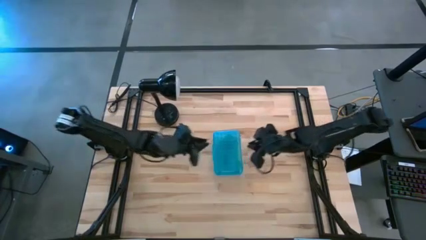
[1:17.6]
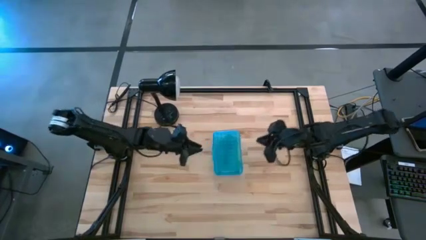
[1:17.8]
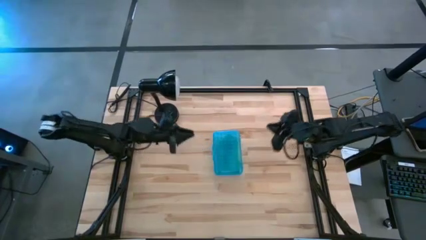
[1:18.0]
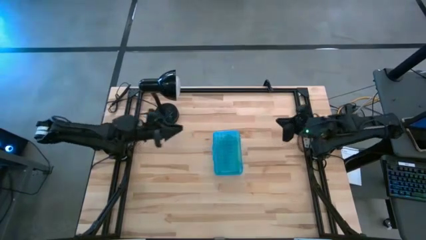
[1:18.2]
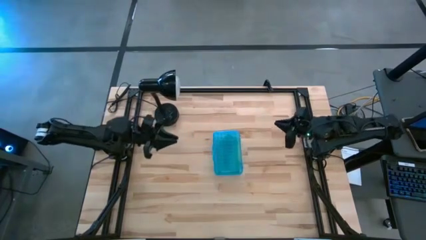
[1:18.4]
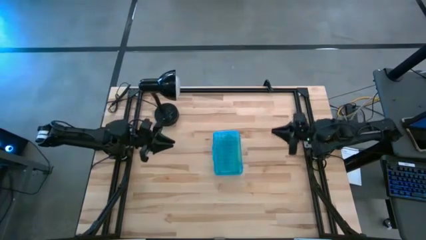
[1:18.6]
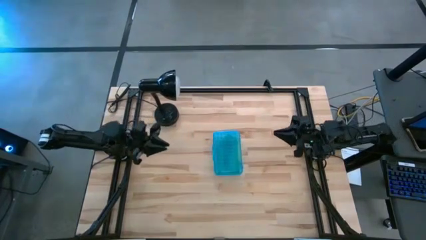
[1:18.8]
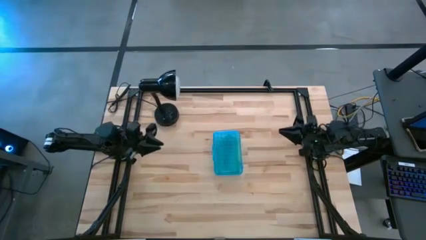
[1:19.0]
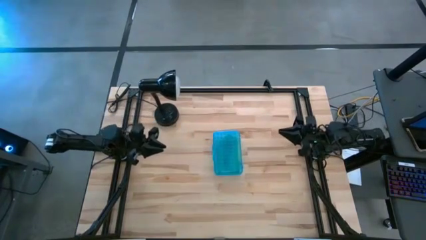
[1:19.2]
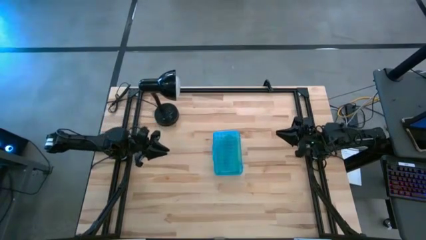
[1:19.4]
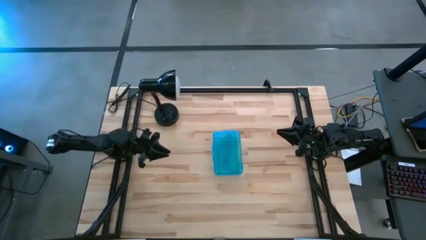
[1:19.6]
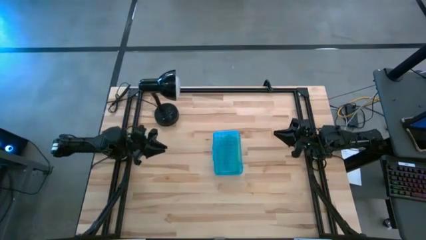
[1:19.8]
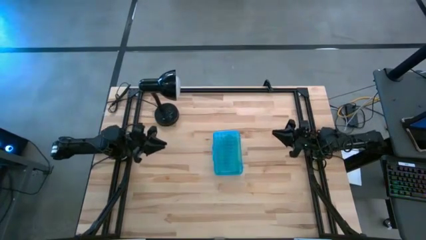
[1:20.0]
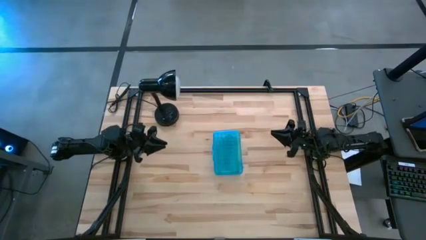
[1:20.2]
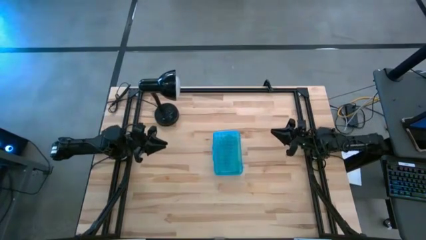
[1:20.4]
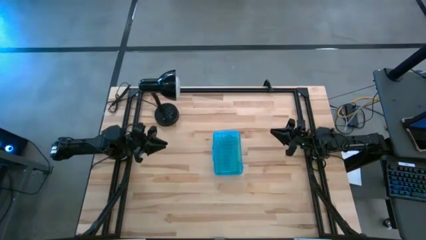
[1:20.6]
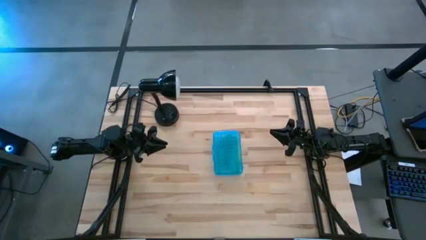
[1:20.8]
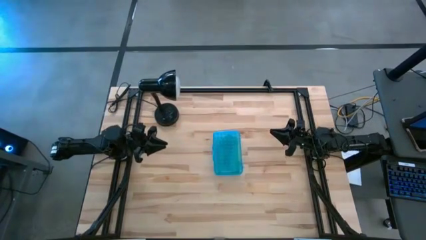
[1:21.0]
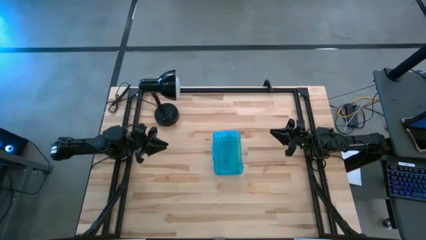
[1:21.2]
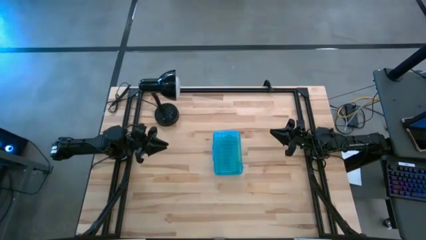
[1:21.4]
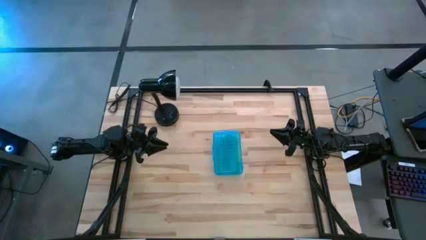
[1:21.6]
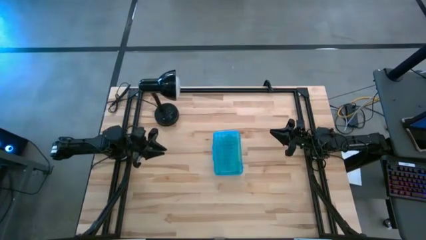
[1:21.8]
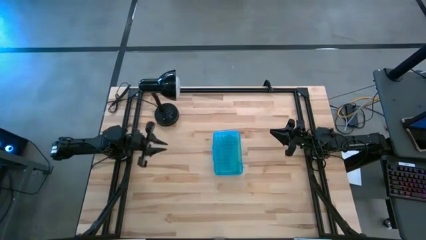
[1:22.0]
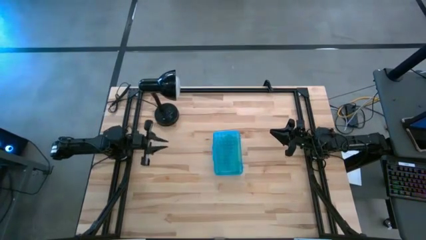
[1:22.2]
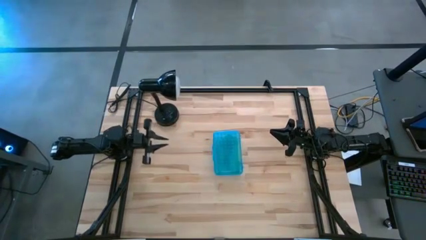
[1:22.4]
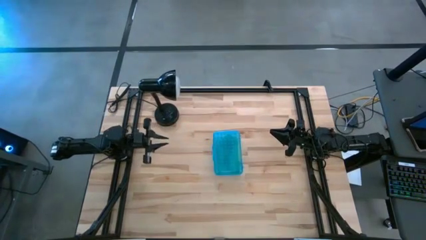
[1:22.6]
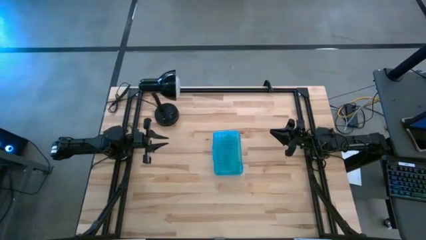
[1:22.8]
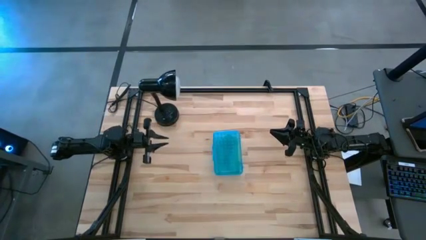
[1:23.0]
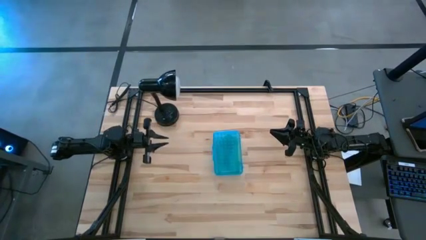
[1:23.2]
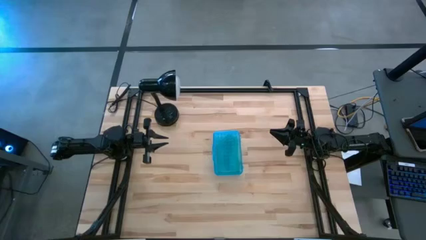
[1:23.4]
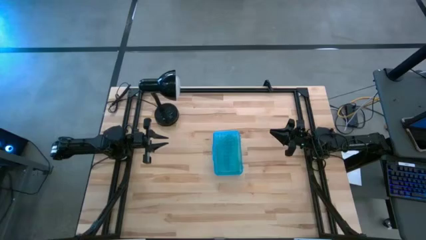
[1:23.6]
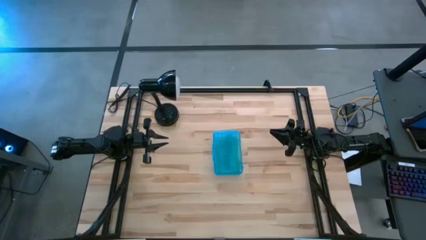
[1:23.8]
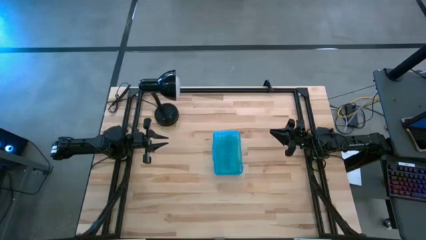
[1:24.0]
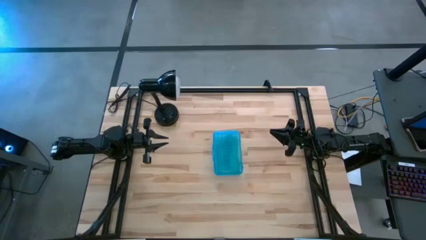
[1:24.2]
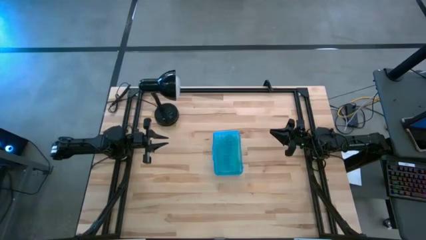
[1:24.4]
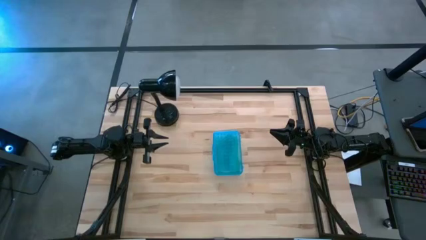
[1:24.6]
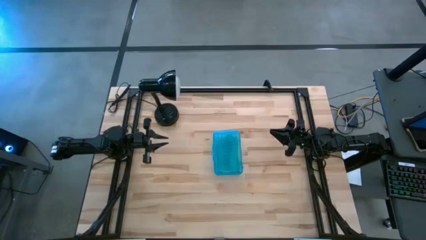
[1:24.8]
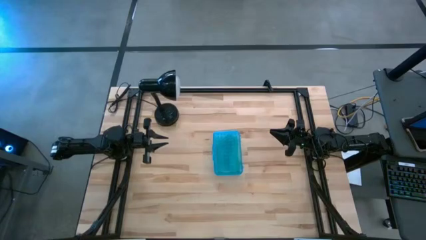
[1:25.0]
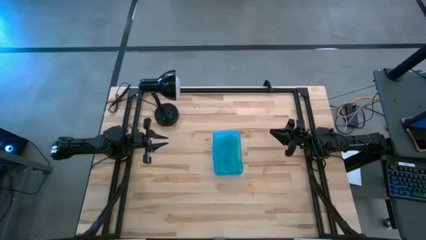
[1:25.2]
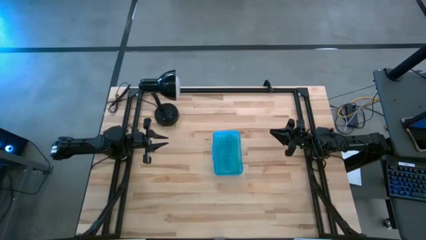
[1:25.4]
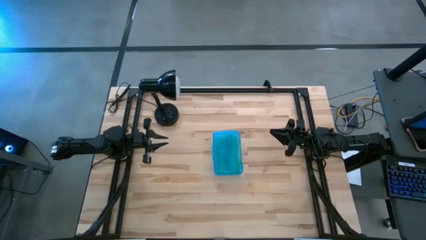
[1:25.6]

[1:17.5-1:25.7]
Task: Pick & place school supplies into a supply box
Return to Home Position

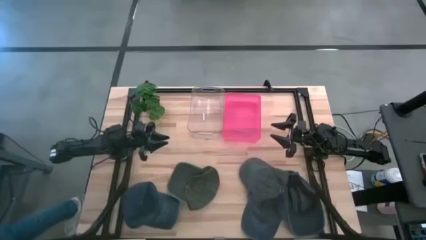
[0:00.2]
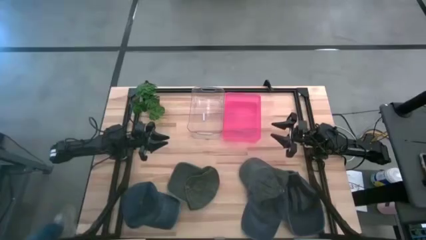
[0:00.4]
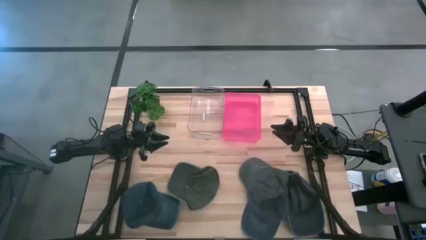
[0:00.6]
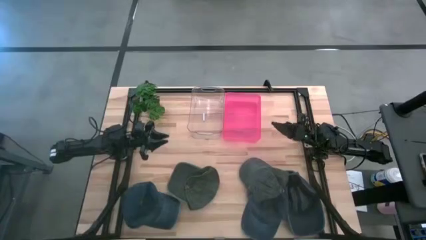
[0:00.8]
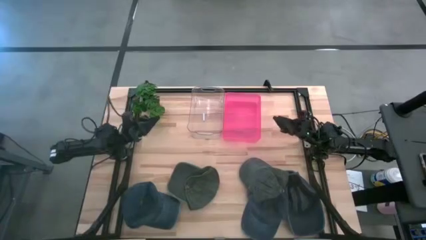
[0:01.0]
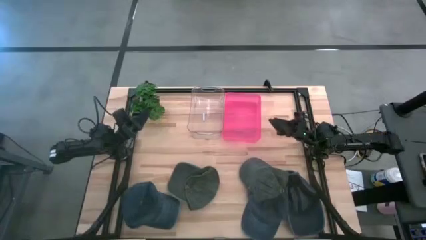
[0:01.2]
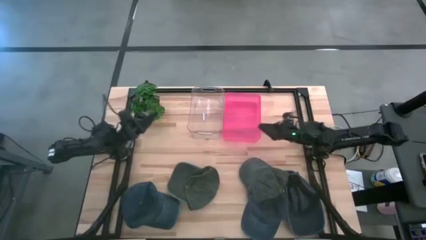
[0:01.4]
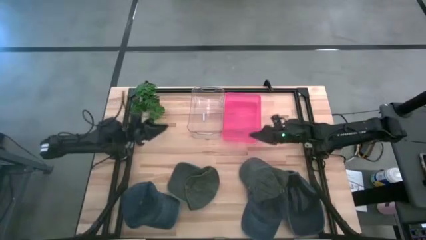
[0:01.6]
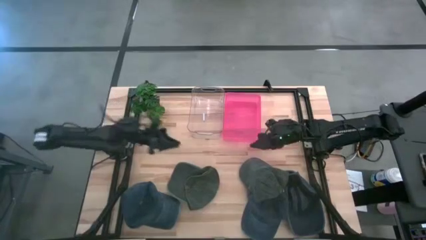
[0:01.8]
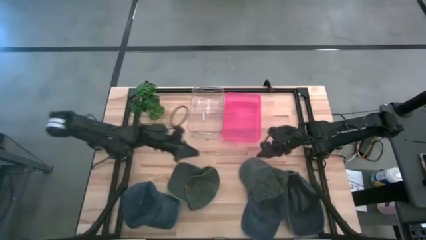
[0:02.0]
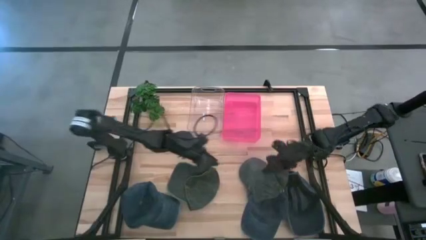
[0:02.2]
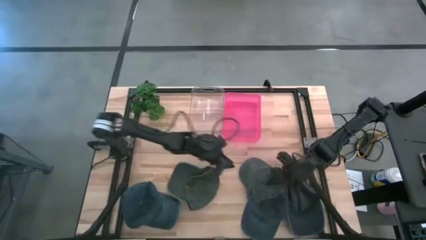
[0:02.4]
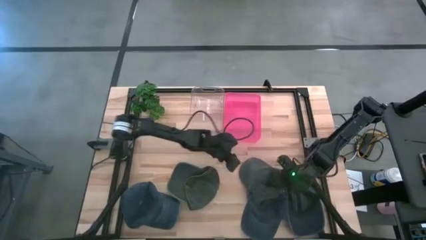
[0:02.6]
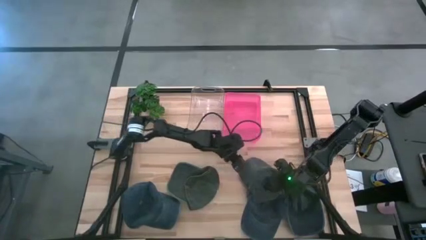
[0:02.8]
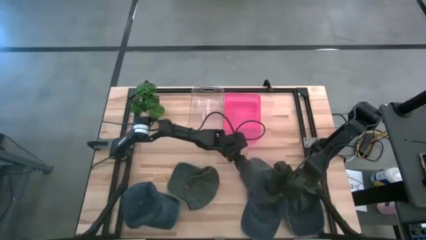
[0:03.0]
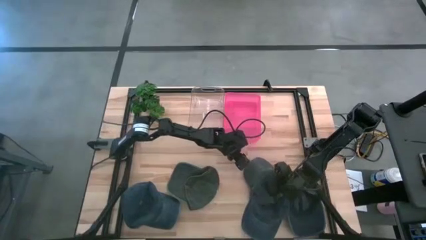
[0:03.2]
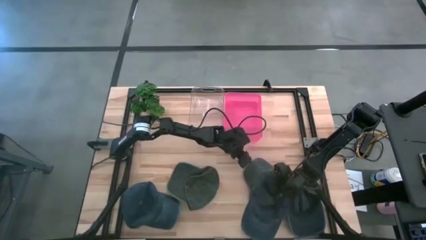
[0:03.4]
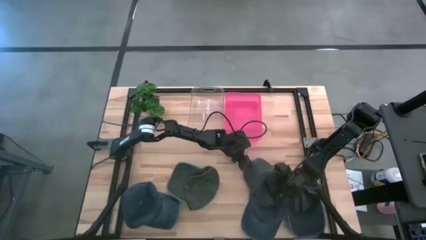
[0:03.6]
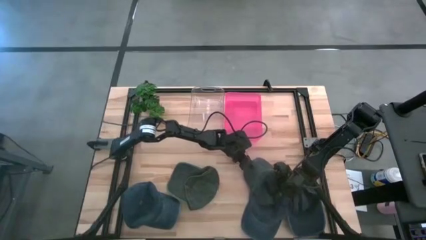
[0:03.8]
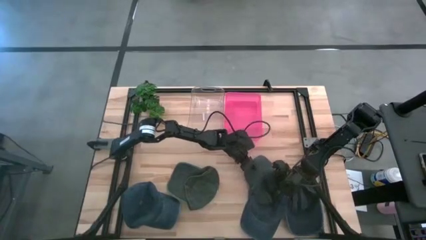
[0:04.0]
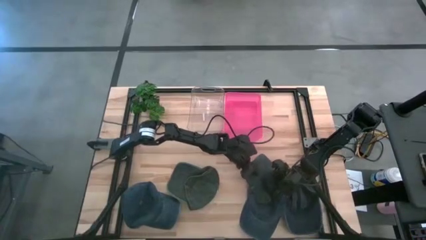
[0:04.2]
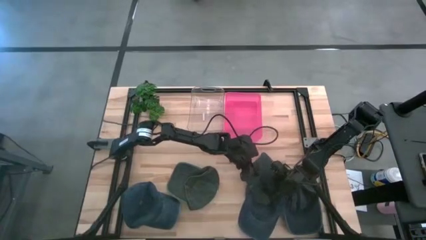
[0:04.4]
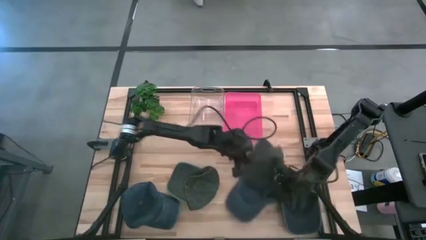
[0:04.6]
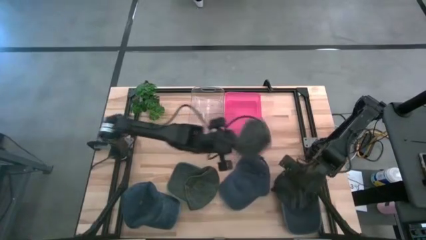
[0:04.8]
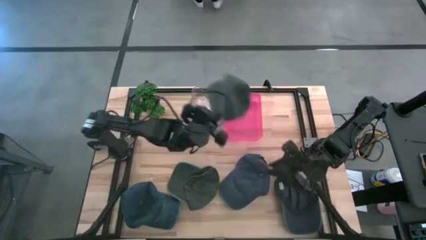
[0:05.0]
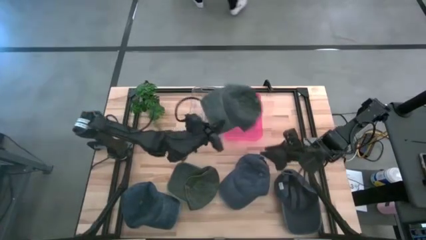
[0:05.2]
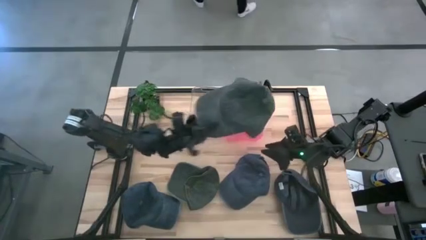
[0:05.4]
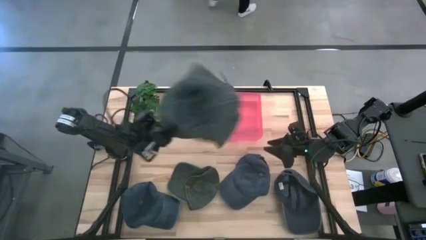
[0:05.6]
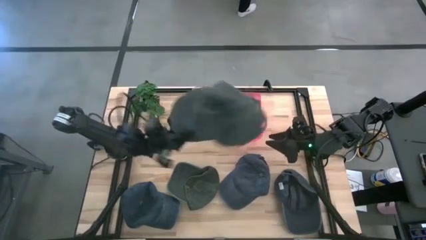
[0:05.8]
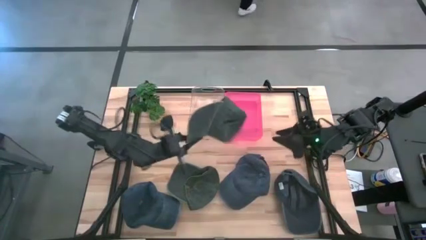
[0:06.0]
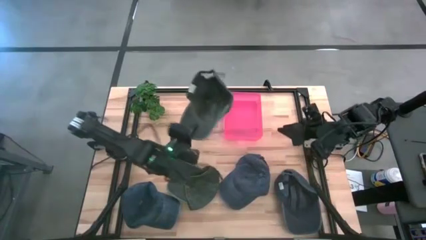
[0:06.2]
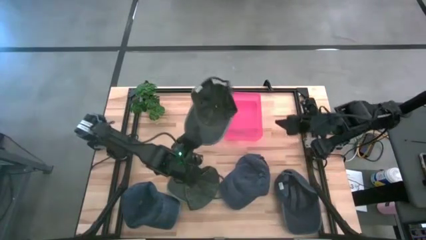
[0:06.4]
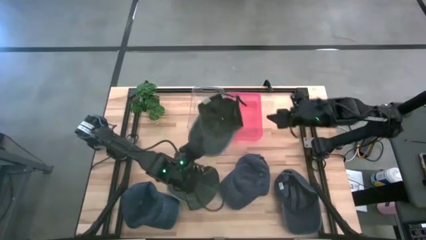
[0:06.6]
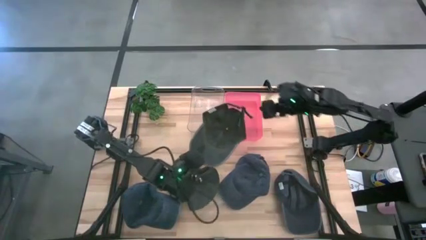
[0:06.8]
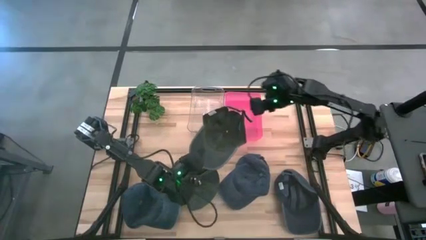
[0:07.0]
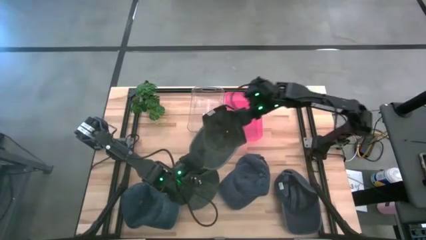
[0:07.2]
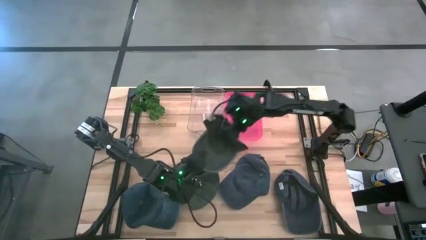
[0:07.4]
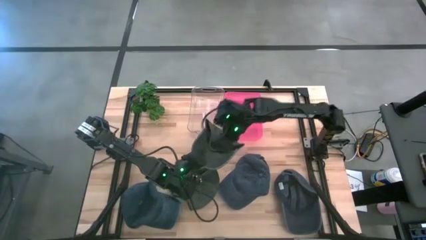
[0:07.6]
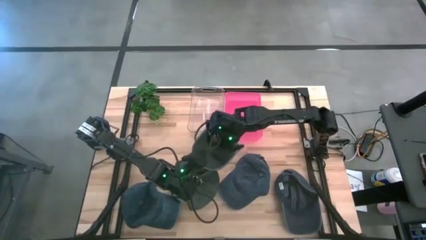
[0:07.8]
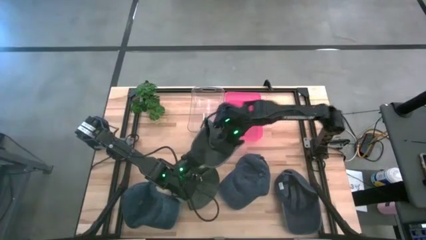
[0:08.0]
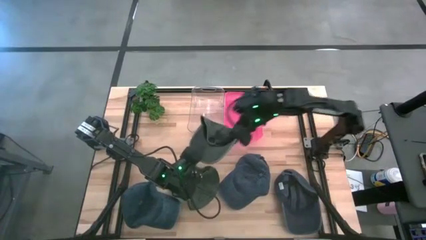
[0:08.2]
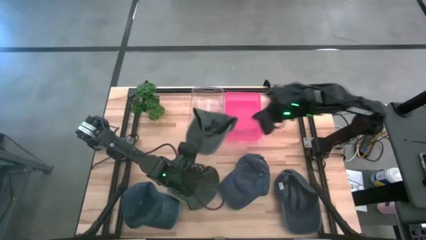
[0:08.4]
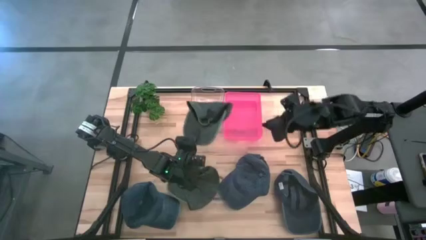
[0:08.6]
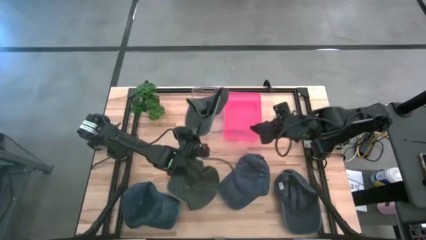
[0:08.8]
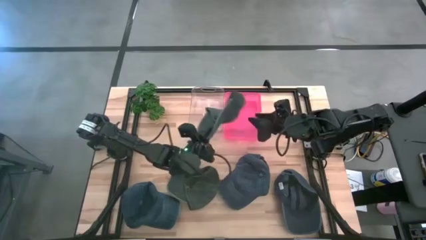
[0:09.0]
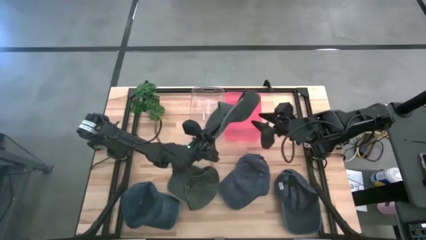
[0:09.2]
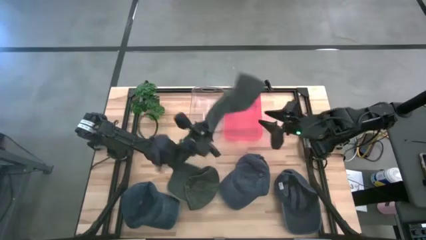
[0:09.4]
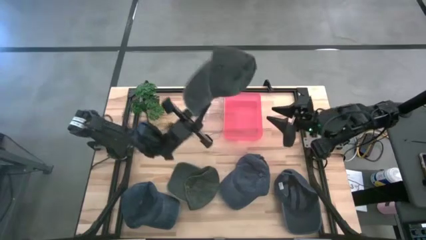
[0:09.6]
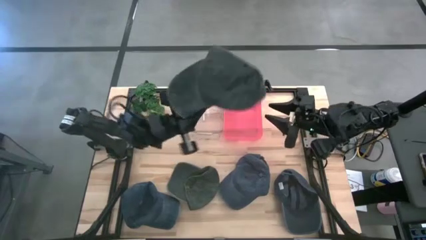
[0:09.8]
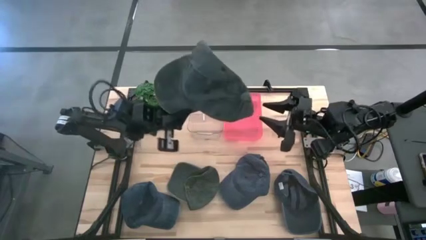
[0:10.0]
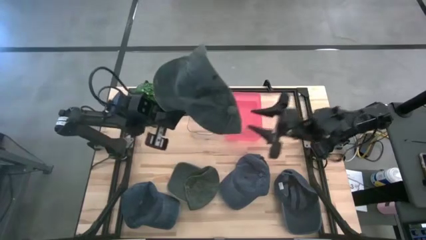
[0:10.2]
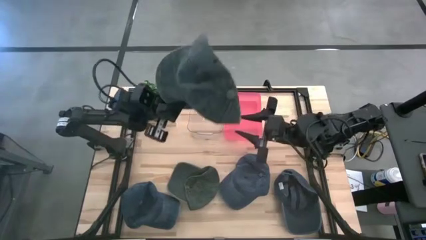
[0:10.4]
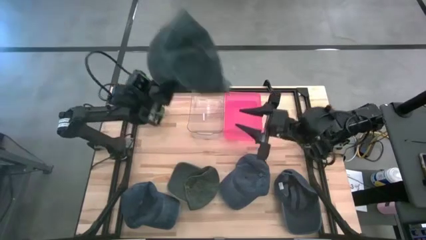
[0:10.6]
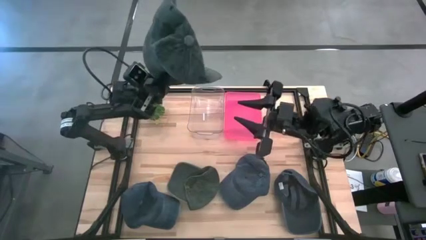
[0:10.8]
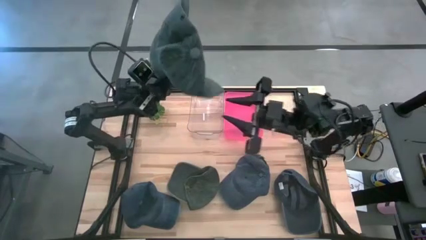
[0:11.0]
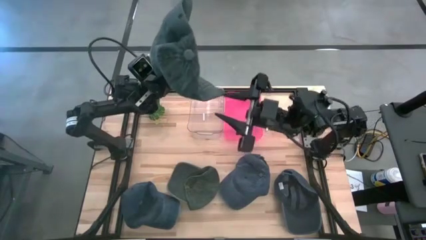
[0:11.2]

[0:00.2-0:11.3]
Task: Pick & Place hat
Put the right black cap into the transparent bin
